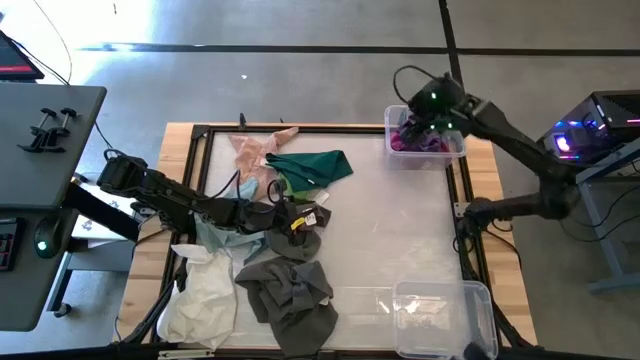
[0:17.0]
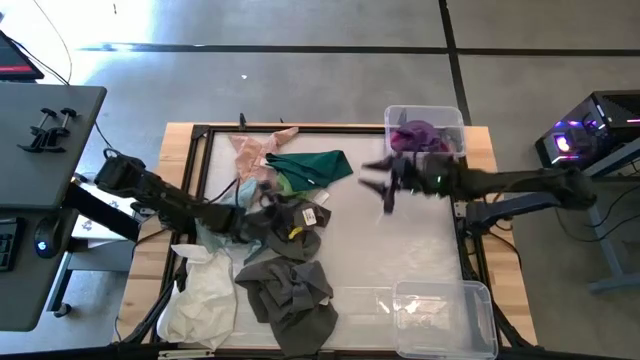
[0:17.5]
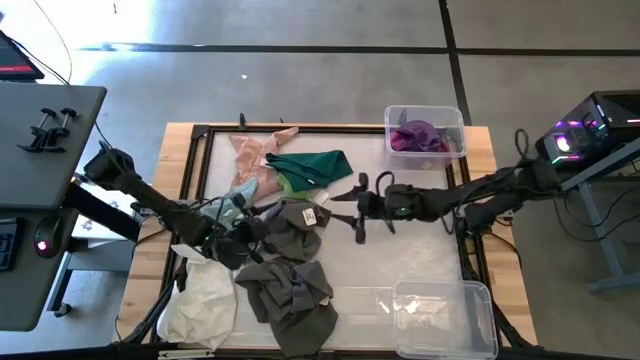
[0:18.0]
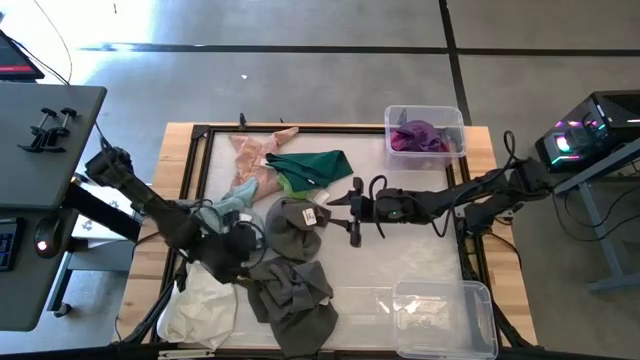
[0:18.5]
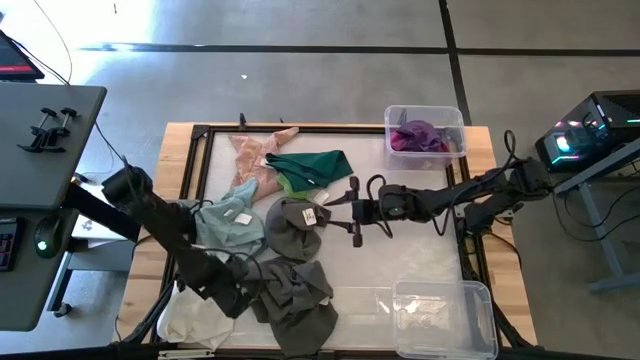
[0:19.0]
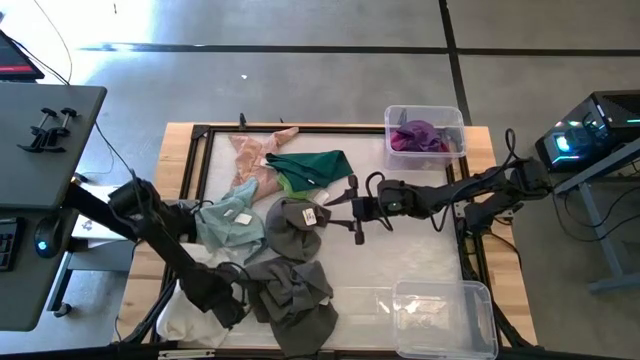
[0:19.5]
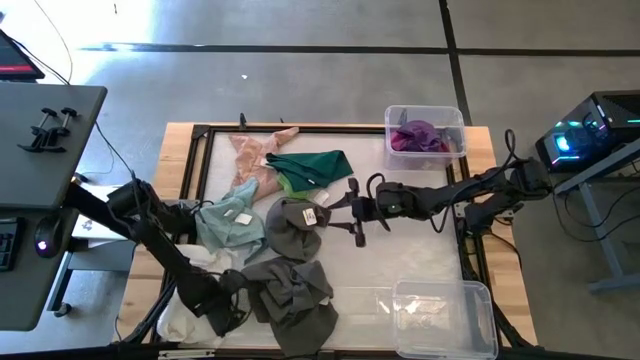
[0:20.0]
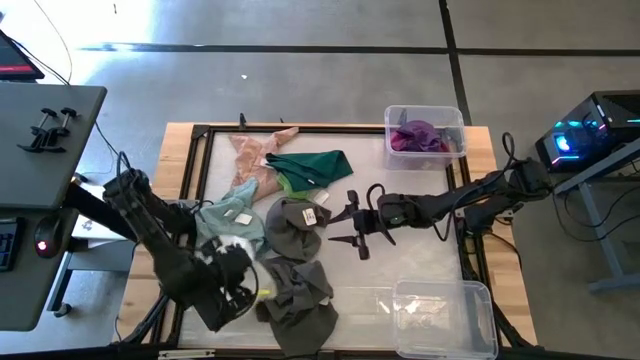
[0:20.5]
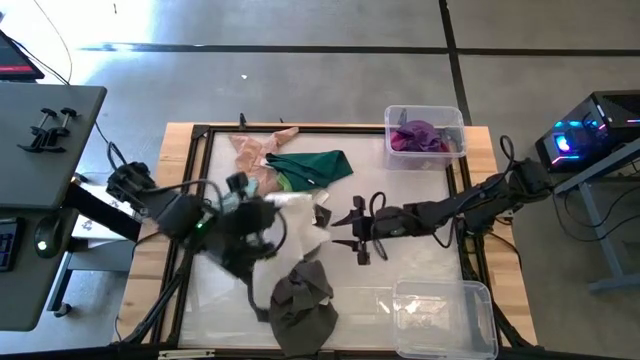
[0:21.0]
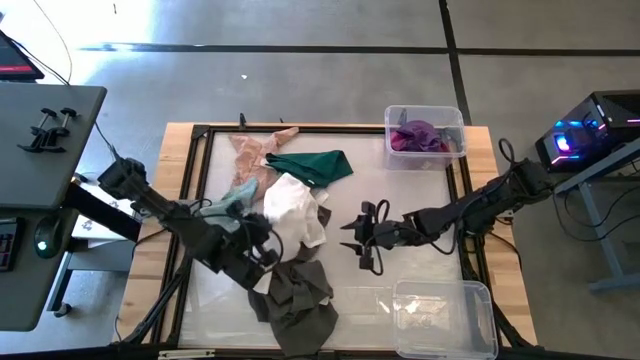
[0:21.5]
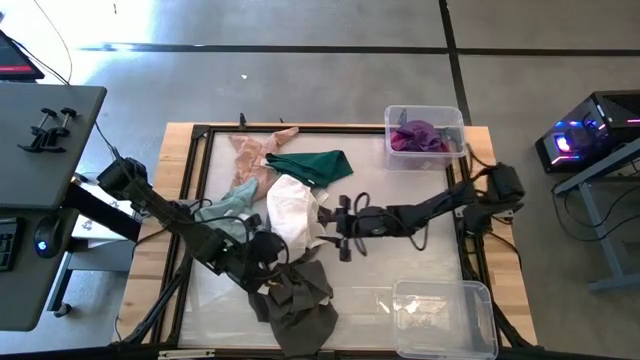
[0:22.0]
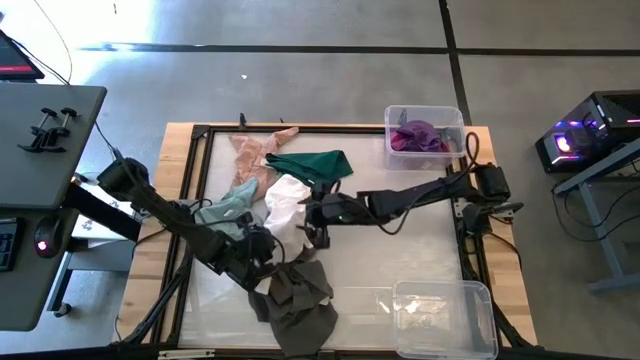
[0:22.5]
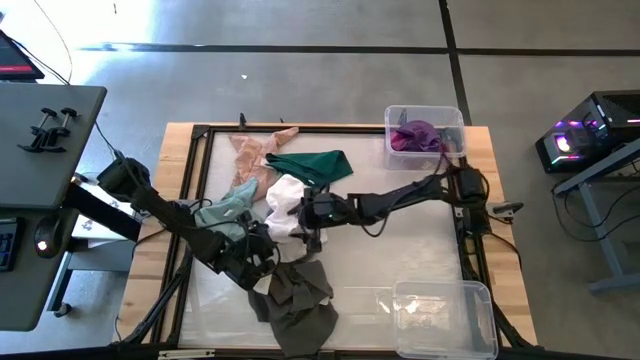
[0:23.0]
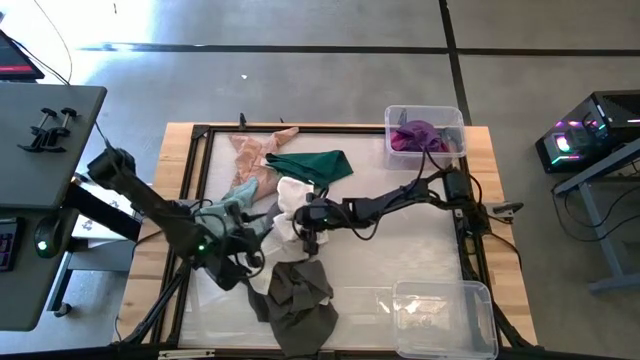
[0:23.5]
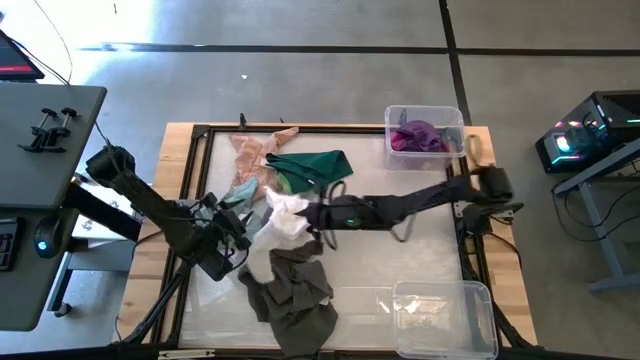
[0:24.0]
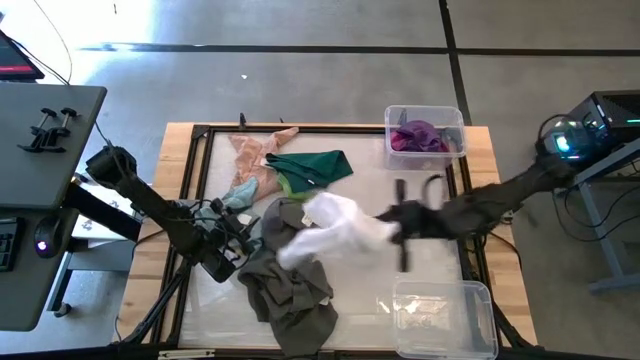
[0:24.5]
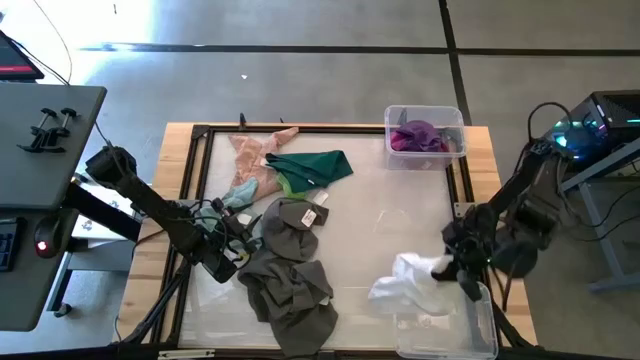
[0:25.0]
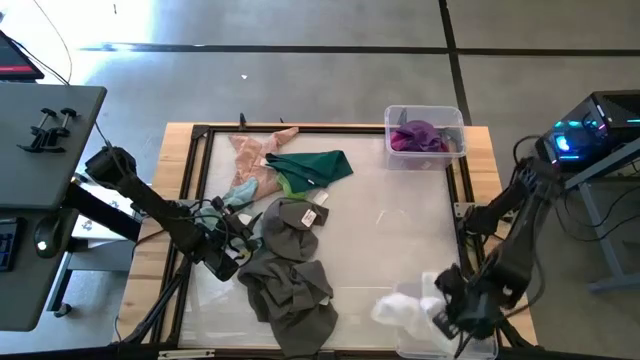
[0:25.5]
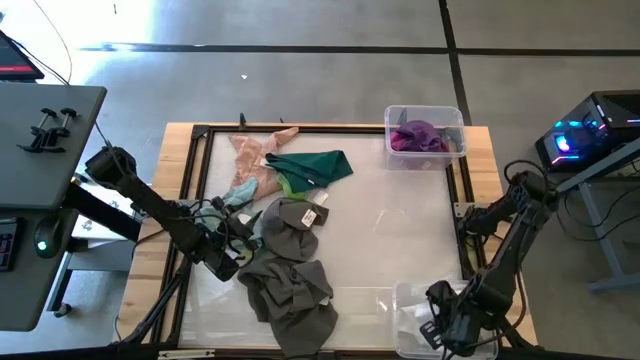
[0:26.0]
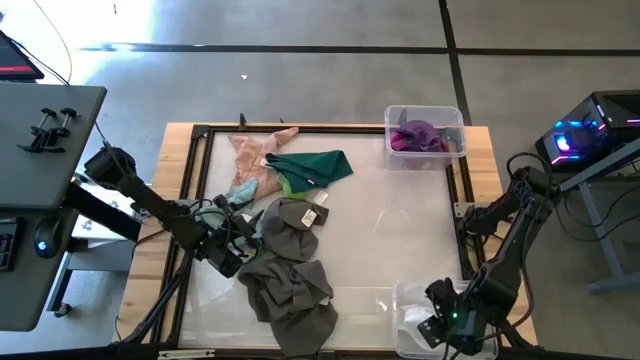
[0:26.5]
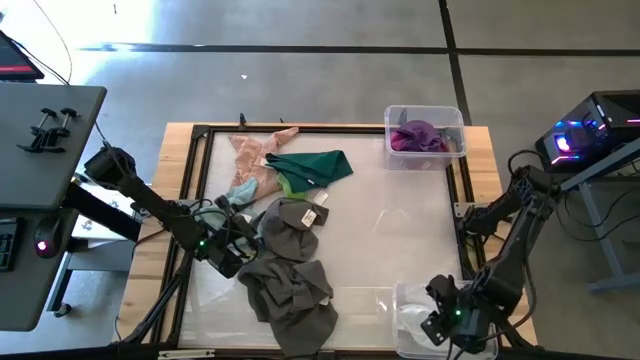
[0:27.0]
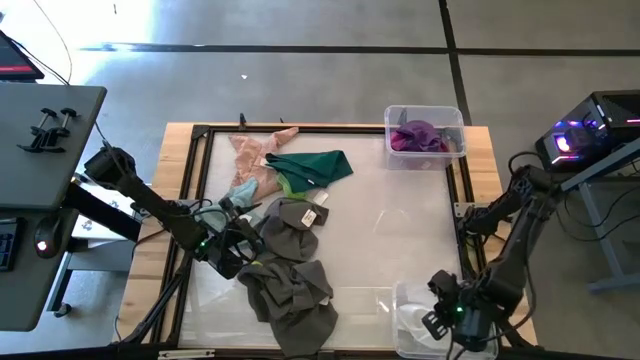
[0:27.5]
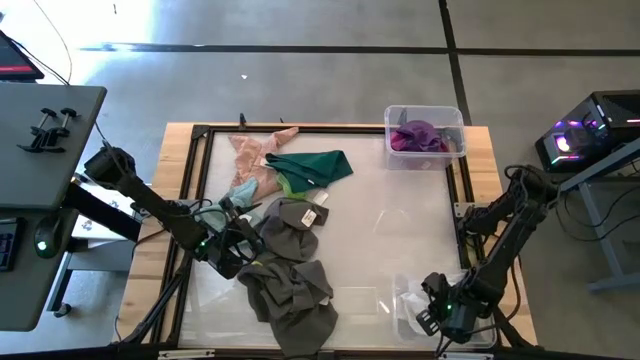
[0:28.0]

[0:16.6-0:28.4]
Task: Sort towels by color in basket
Put the white towel into the bottom transparent bin

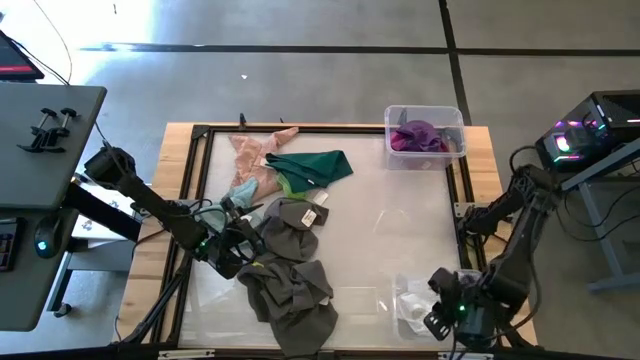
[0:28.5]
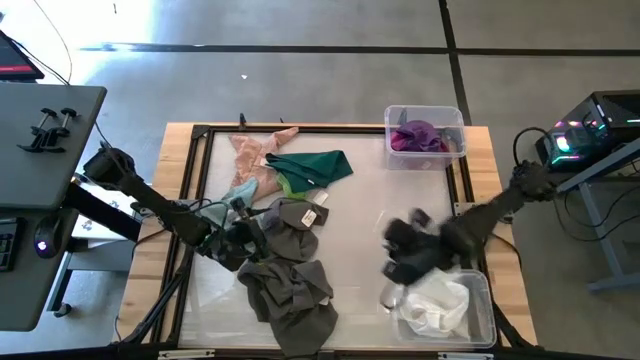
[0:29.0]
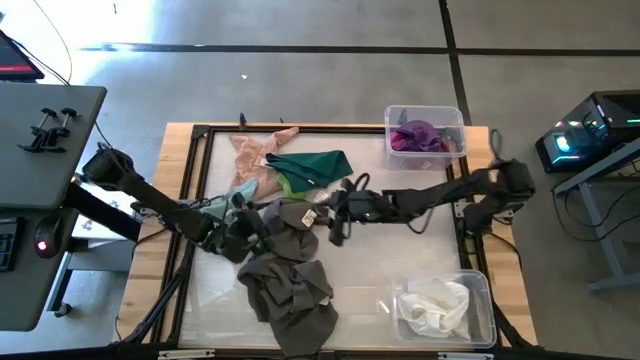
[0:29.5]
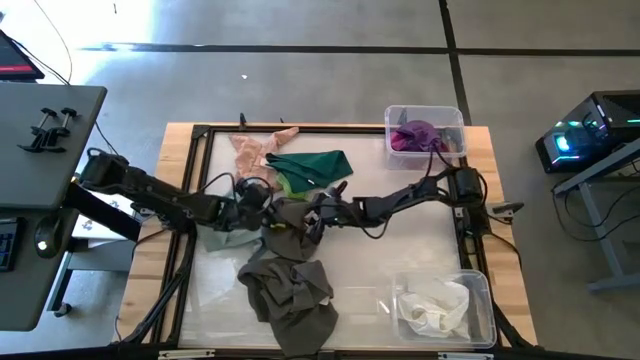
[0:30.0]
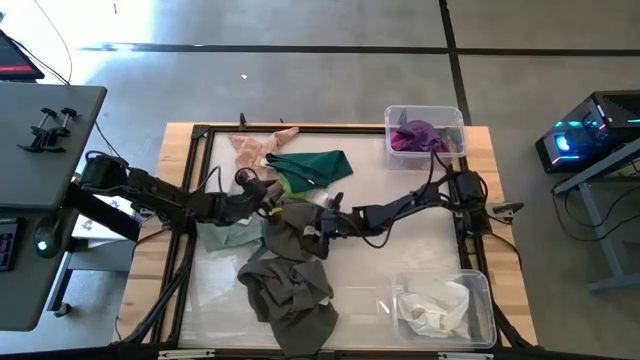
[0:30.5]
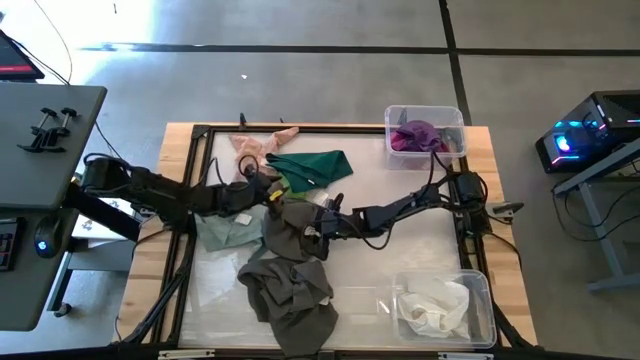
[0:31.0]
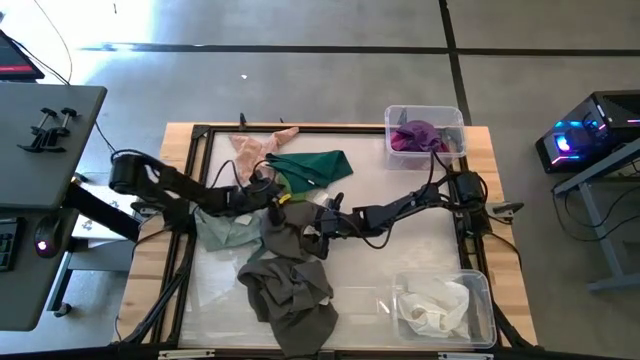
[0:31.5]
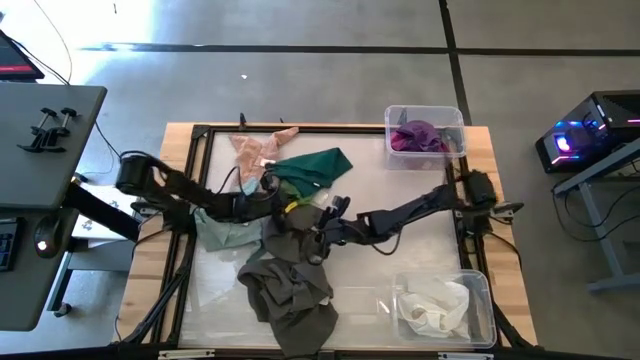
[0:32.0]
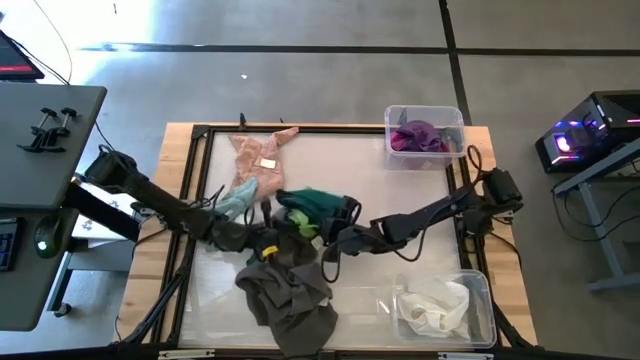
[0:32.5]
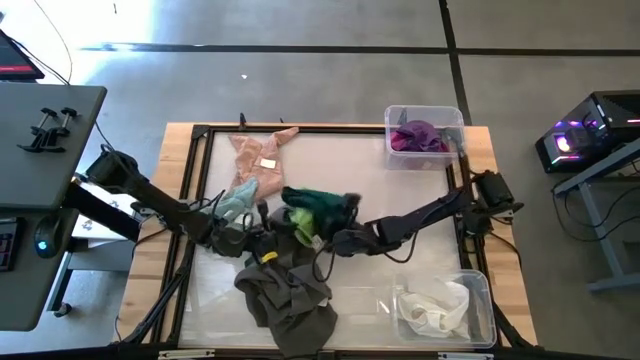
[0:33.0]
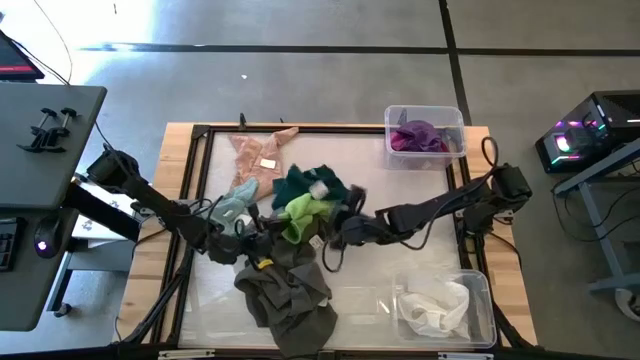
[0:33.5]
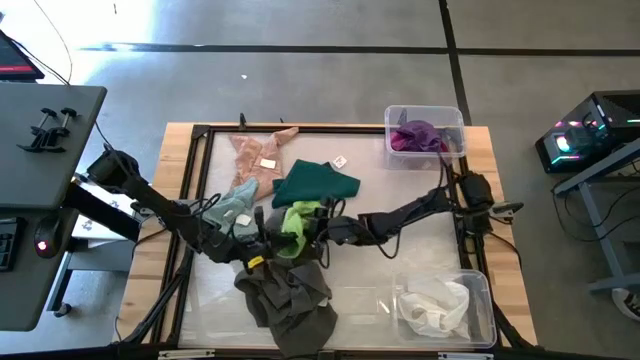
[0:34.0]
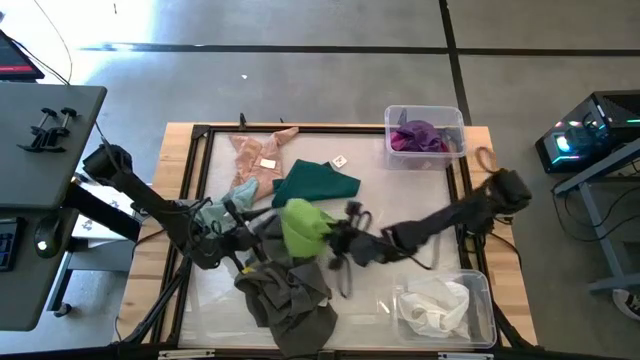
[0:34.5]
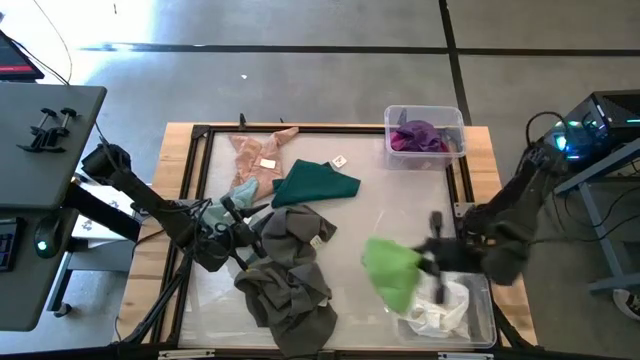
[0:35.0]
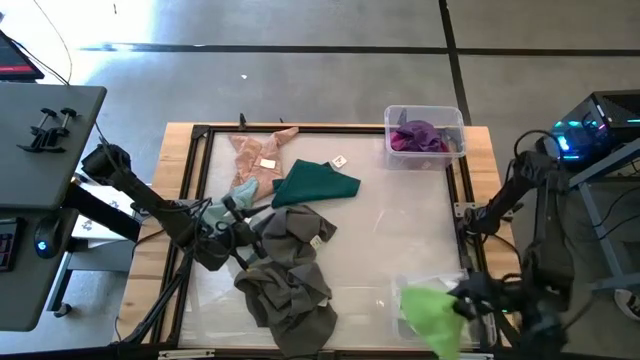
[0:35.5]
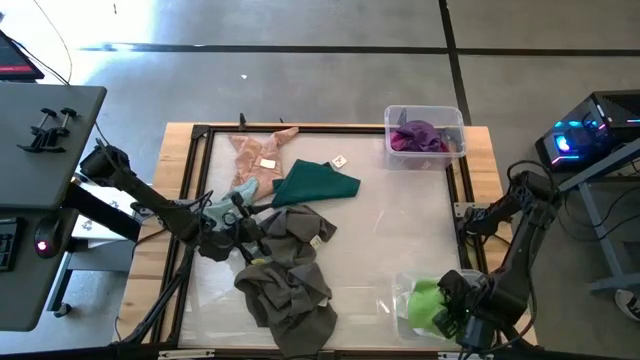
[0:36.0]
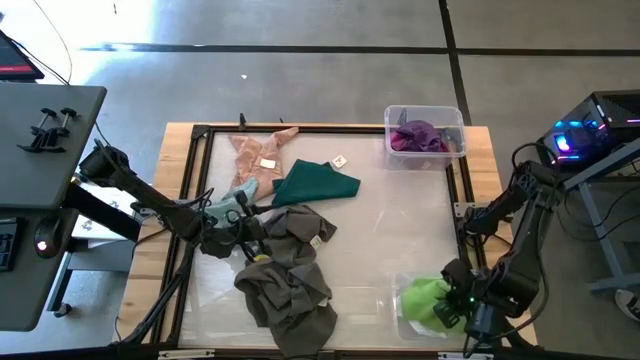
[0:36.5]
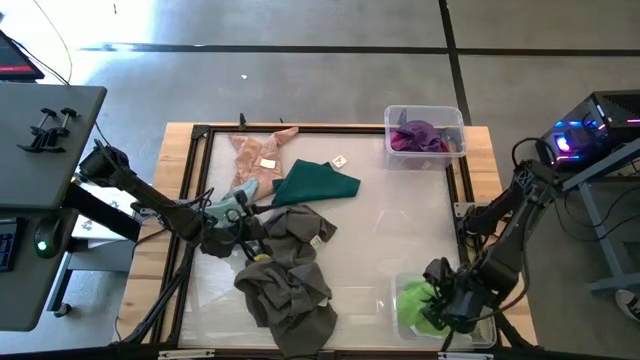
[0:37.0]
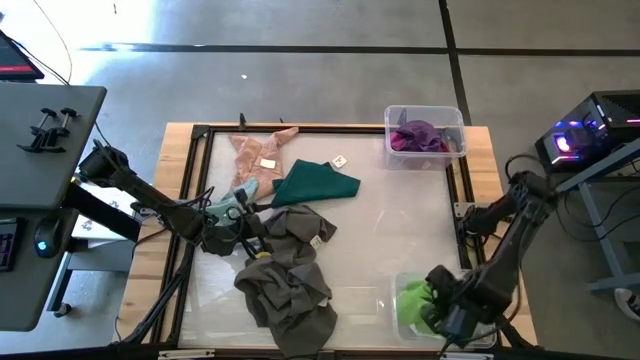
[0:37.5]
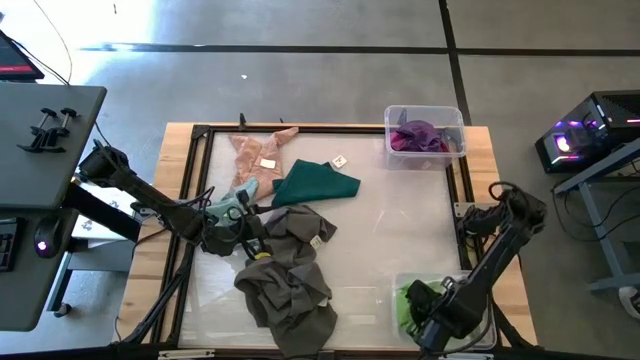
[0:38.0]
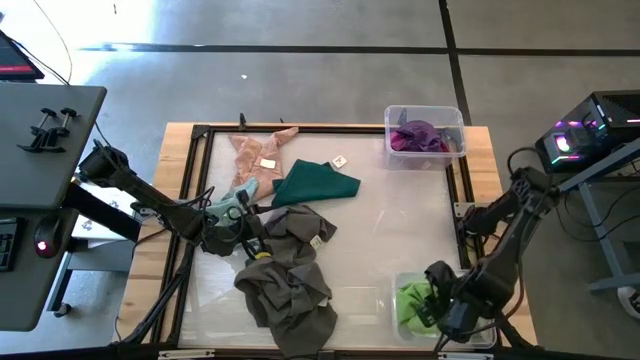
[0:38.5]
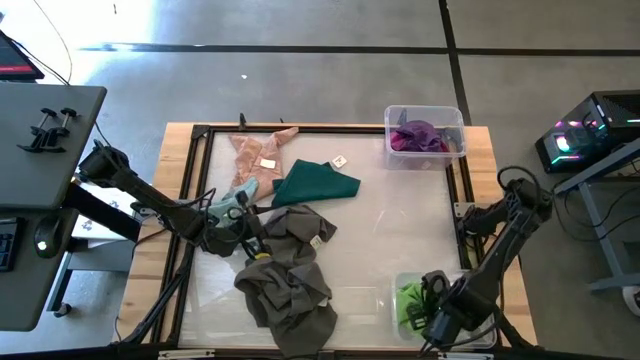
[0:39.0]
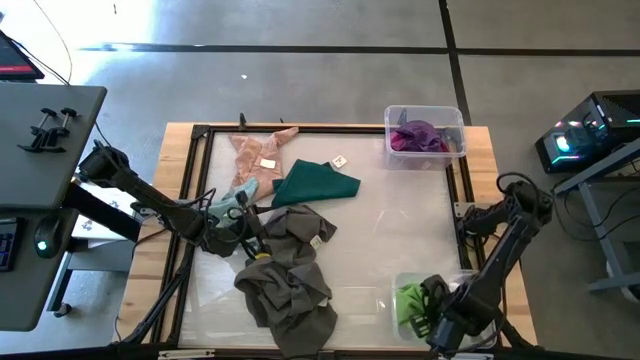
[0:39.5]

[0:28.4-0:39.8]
Put the green towel into the bottom transparent bin
